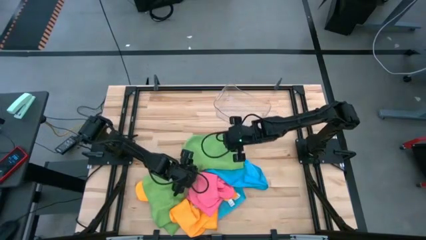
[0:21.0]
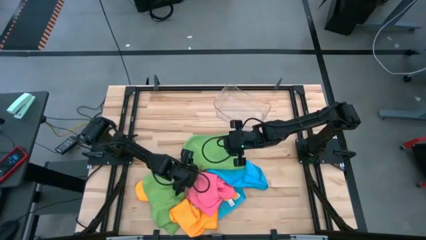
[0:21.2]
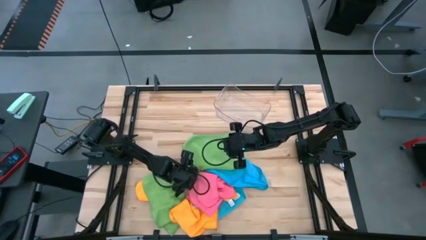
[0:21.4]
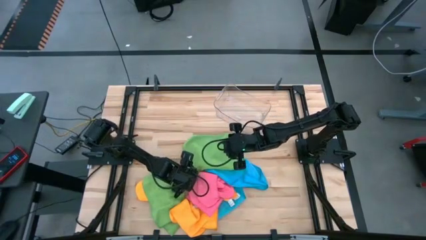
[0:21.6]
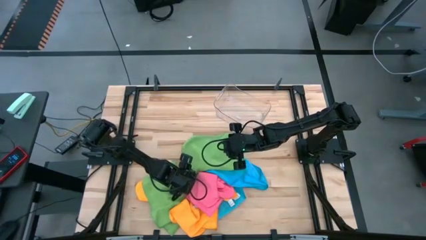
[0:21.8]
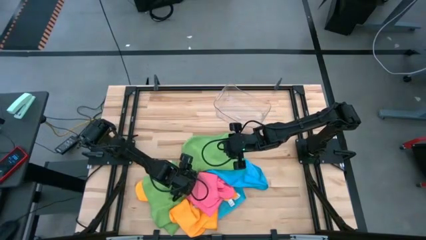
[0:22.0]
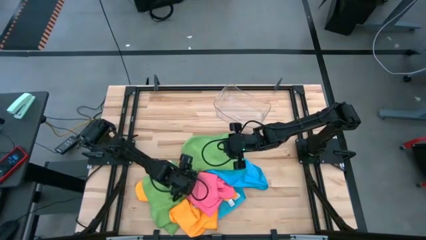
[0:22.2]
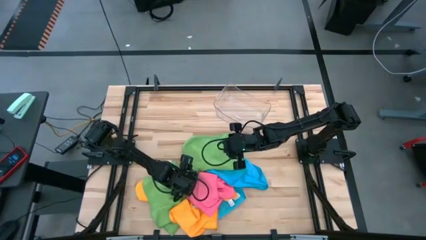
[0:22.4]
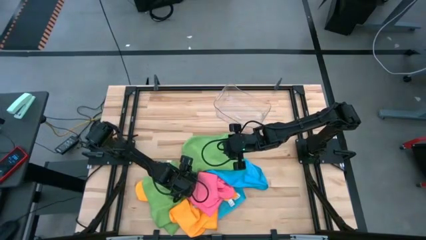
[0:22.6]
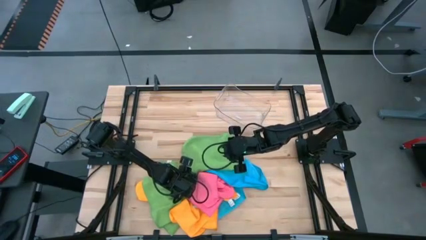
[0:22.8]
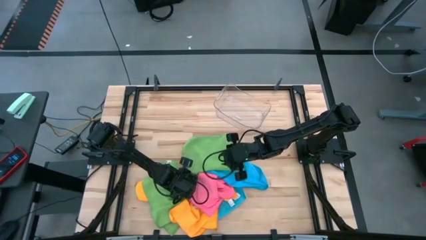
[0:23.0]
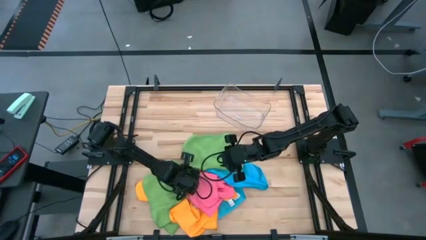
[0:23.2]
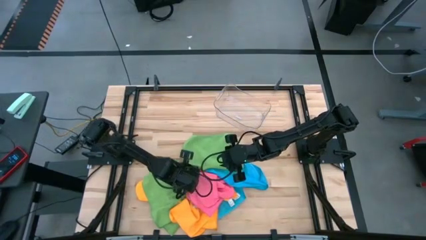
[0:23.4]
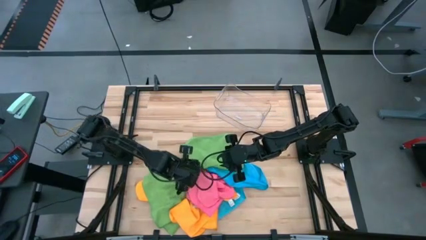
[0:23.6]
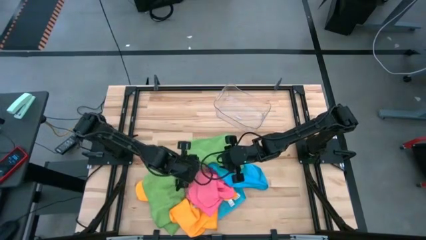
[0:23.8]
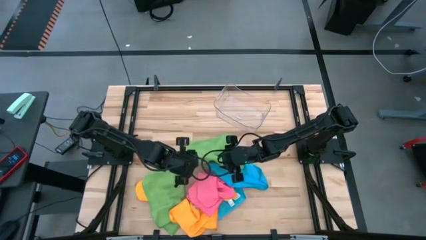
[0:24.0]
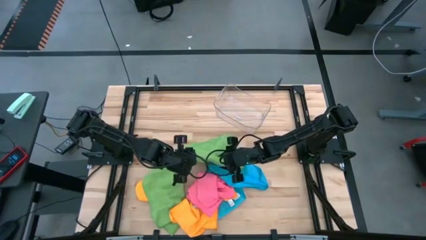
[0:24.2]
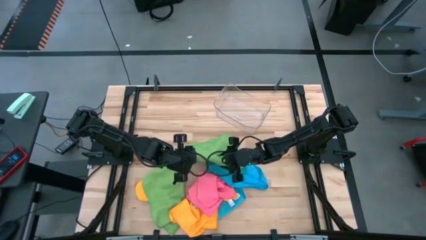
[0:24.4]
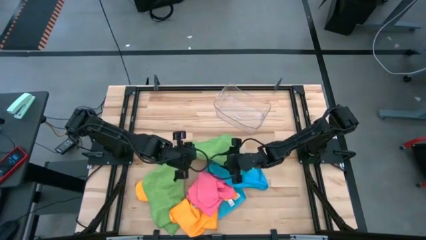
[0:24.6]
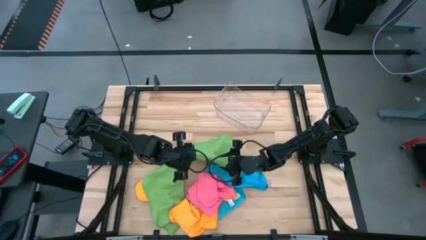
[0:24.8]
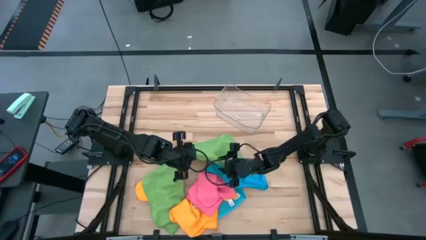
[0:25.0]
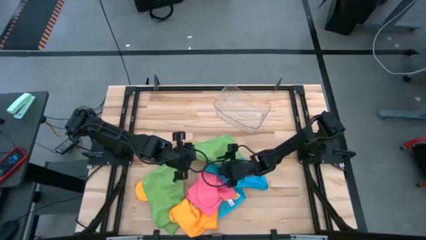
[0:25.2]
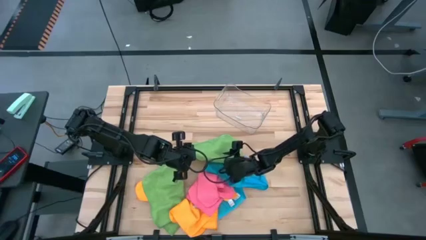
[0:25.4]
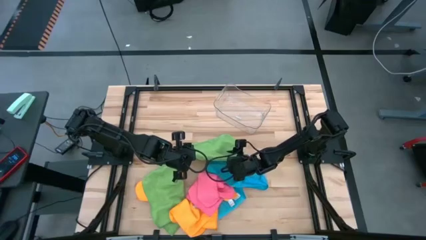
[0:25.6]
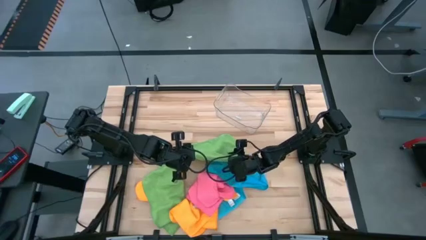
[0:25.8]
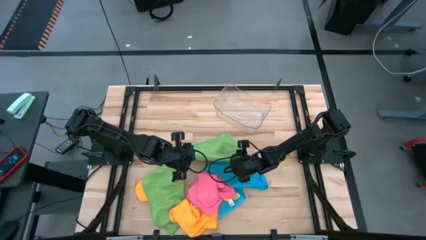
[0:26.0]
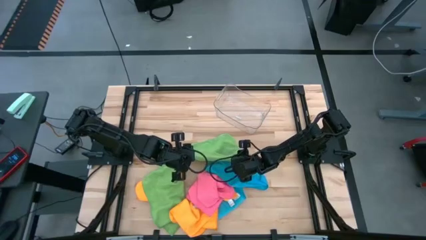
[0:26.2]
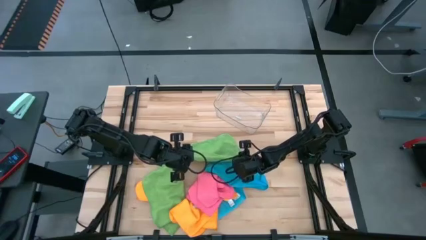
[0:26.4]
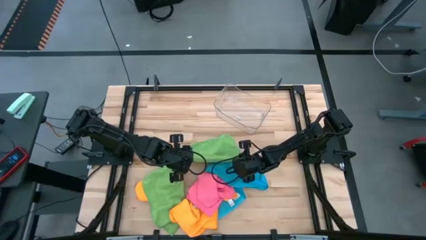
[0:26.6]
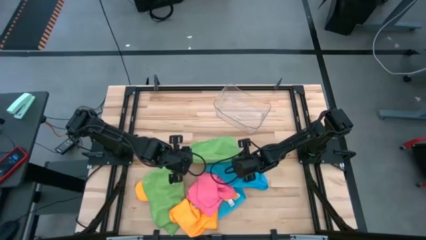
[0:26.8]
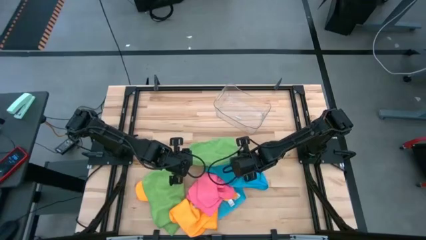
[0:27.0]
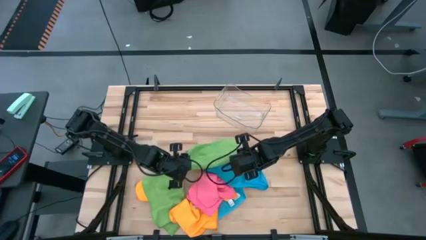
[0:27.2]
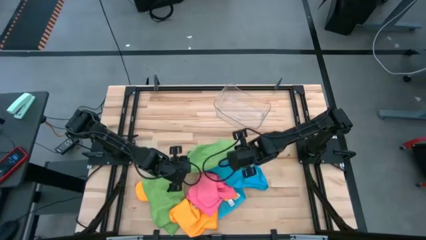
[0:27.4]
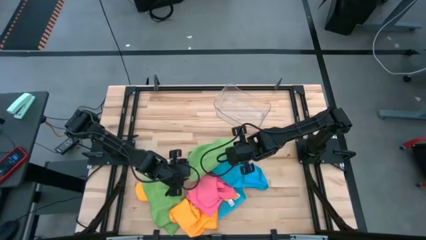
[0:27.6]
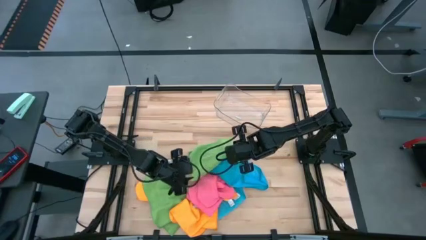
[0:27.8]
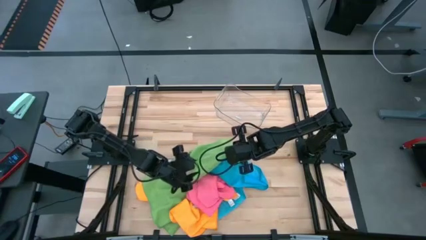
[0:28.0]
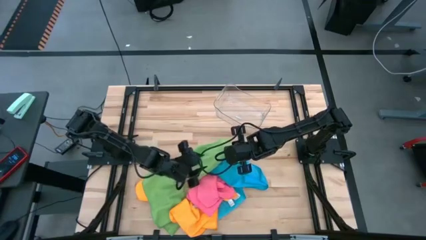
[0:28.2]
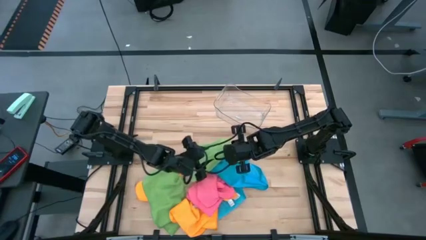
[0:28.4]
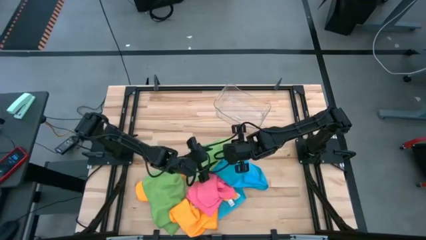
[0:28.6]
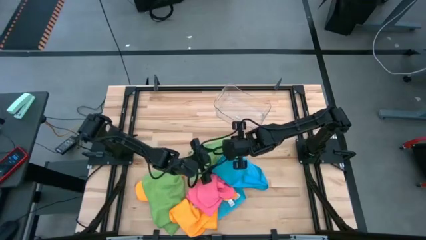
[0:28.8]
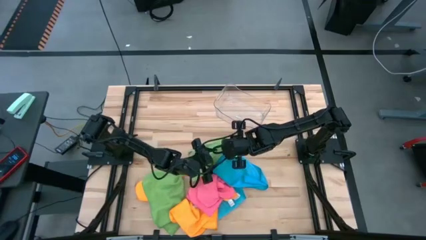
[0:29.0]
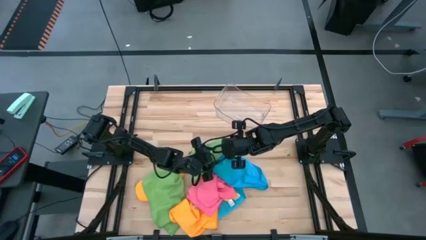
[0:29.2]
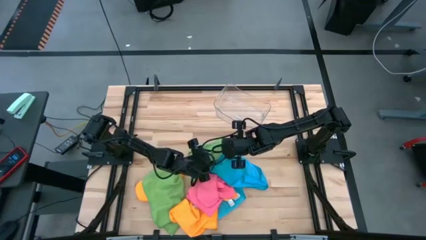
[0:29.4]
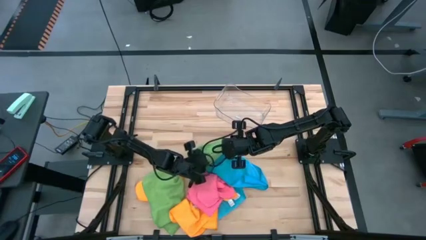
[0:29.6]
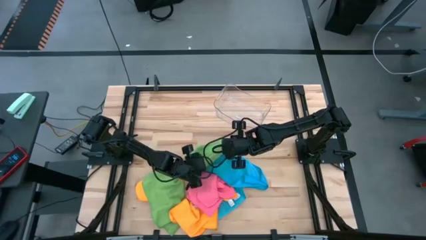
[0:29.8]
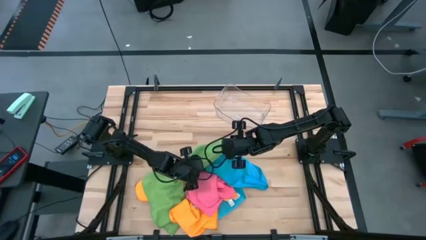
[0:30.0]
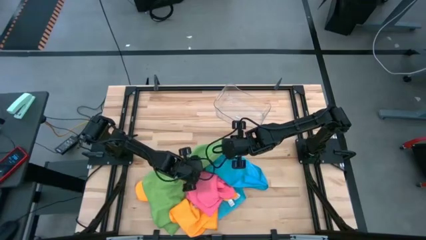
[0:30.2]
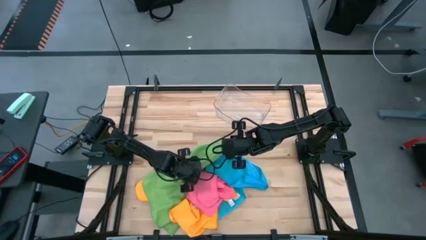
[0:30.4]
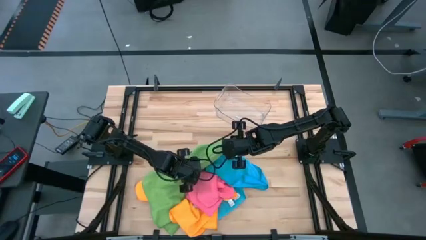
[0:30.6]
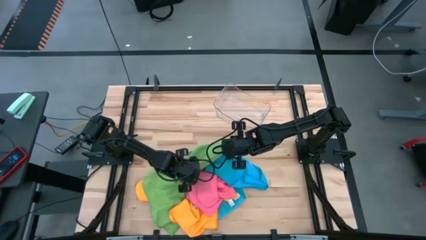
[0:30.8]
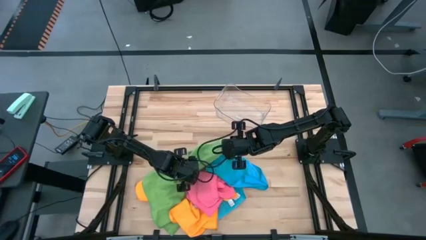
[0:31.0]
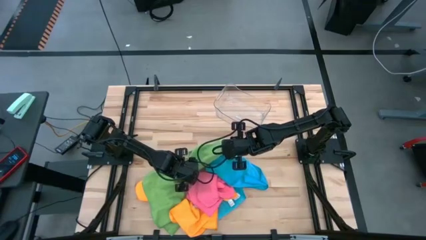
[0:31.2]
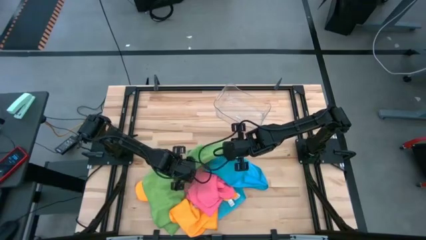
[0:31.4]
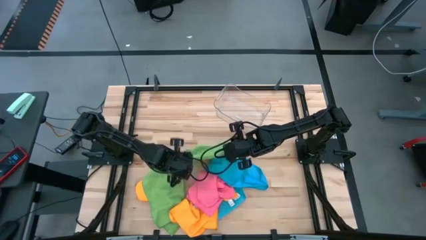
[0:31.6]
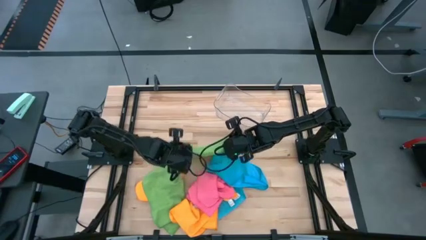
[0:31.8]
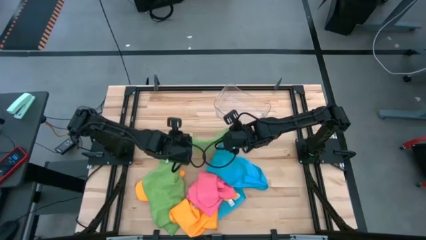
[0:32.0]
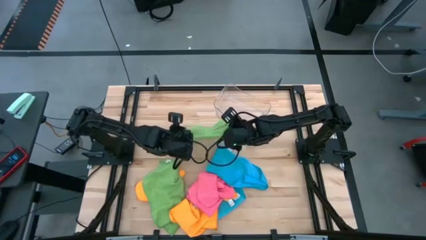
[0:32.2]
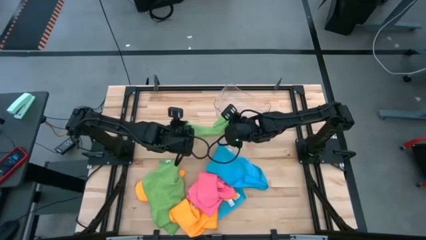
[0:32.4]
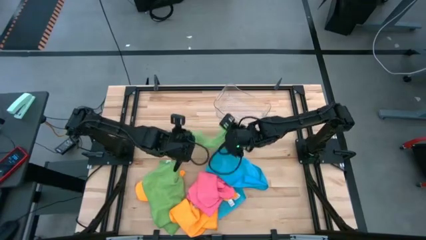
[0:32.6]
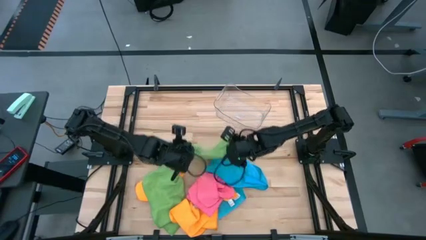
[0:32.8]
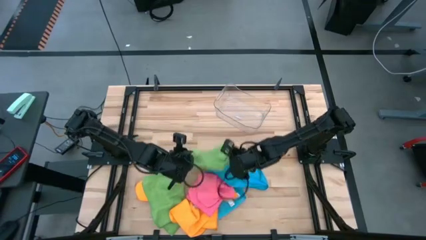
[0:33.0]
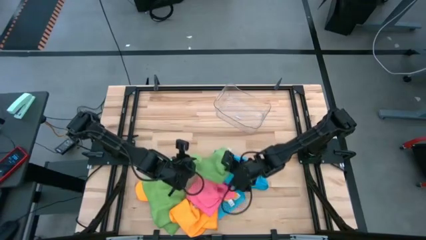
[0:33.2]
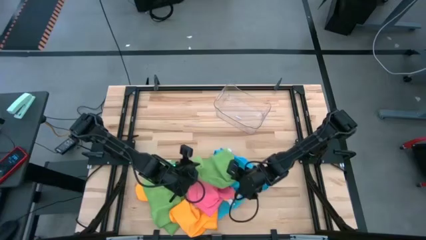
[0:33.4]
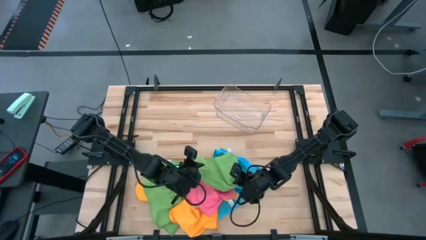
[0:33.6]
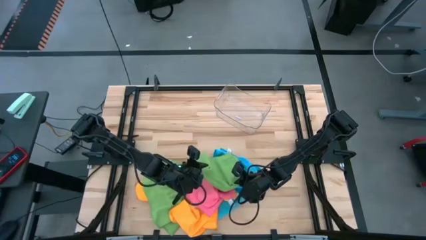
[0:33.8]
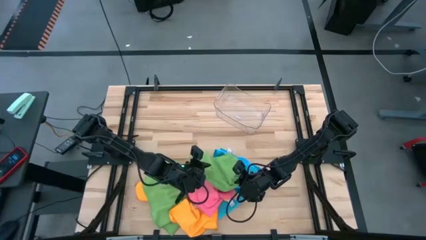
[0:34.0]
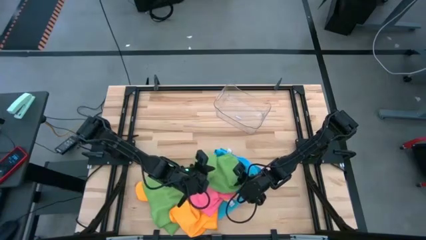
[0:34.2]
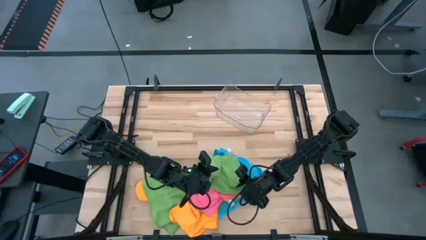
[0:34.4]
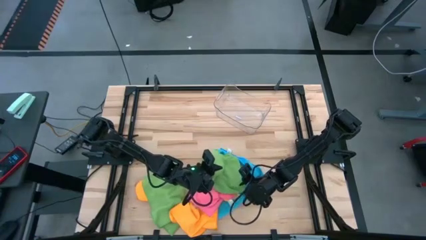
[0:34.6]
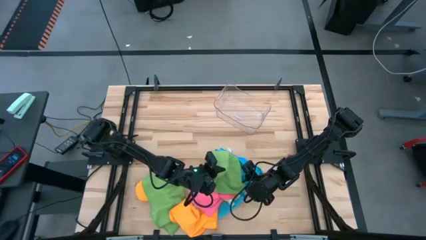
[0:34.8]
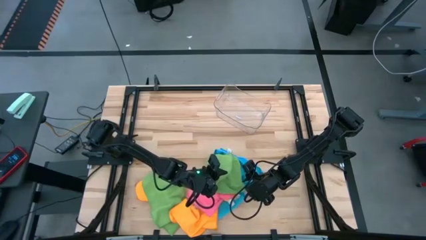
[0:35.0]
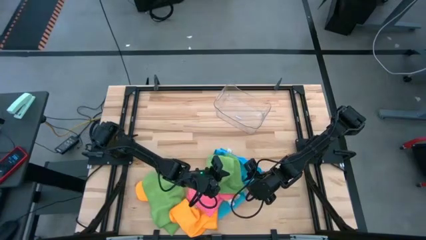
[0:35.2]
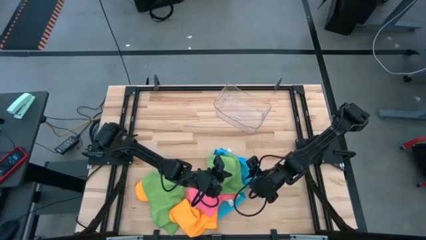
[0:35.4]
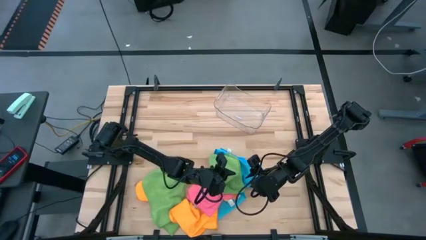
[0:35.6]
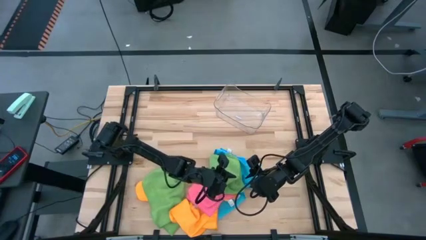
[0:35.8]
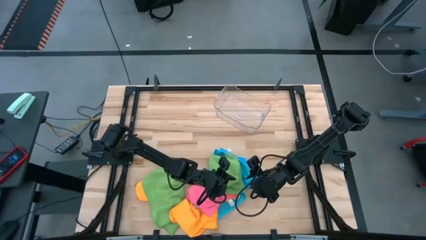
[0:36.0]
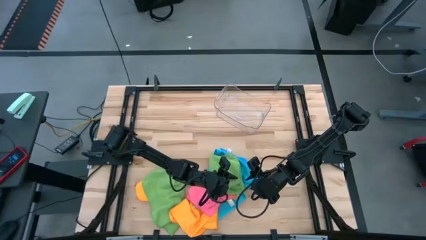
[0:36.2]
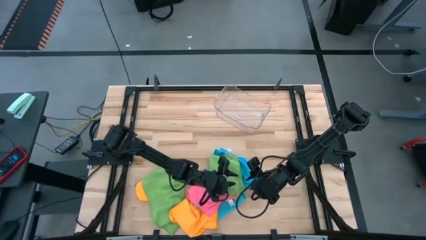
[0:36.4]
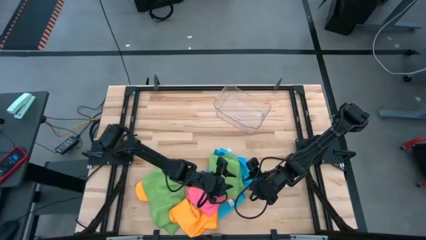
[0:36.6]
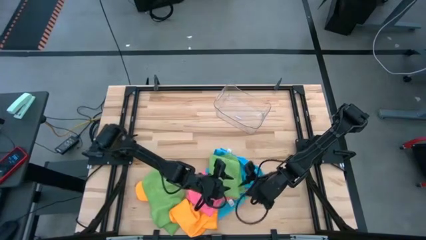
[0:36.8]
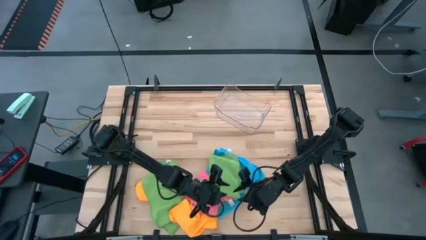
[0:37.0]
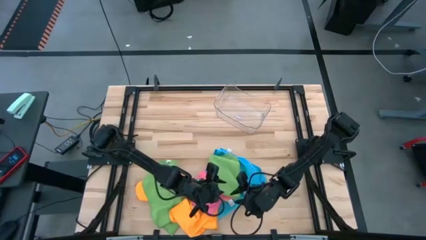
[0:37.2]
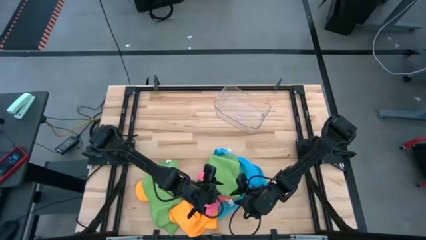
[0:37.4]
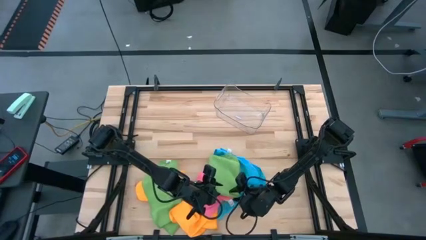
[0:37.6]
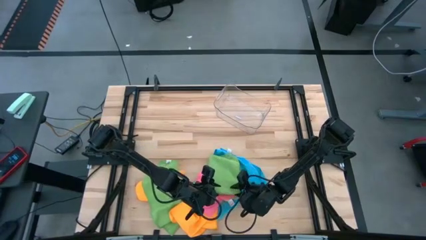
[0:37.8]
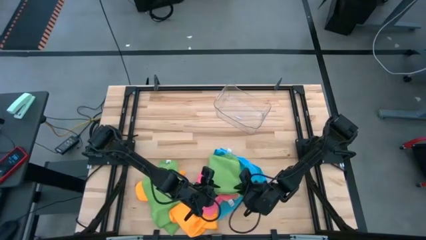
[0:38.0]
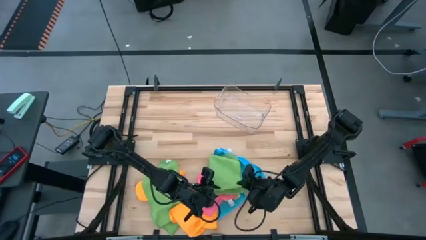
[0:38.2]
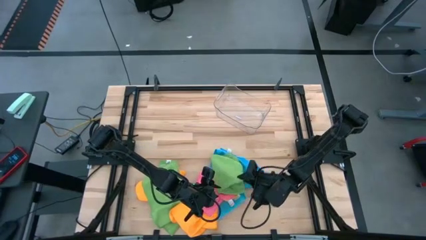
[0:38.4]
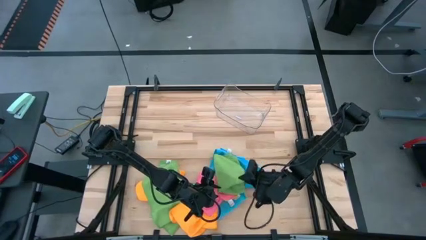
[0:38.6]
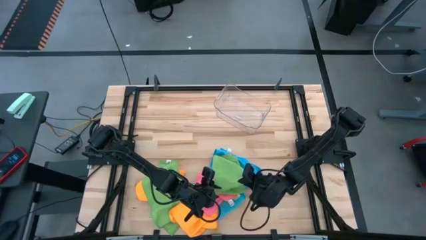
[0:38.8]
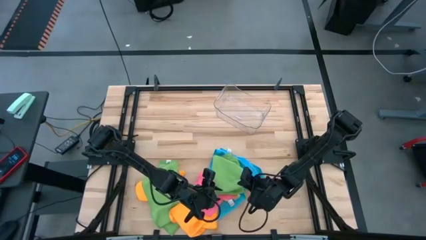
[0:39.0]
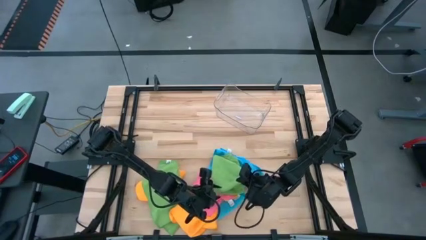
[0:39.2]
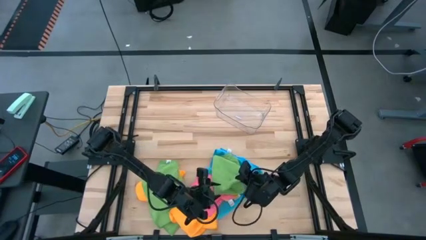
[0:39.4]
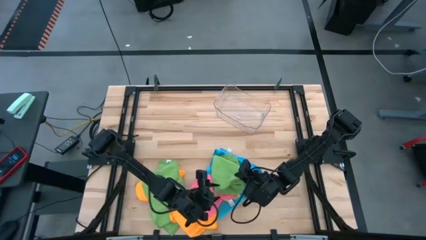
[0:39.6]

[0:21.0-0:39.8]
Task: Fold microfiber towels
Fold the top green towel
